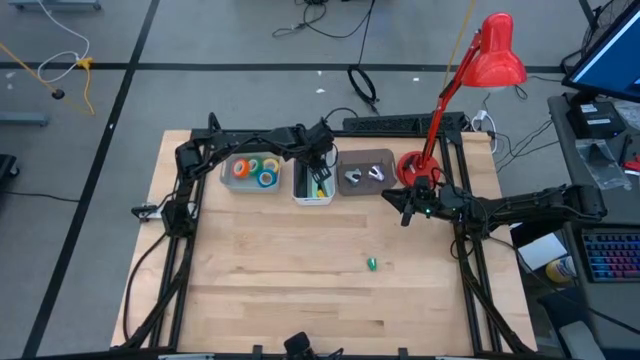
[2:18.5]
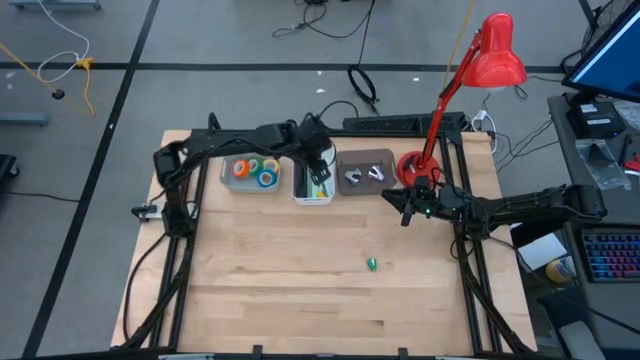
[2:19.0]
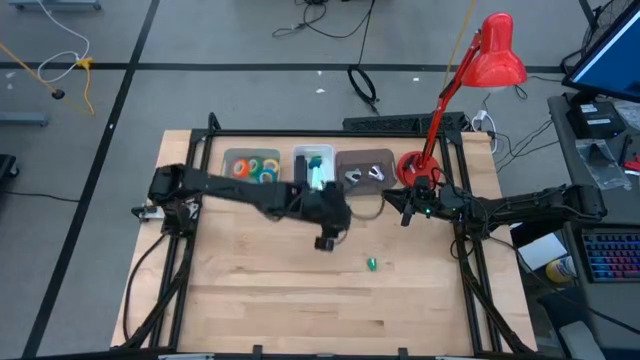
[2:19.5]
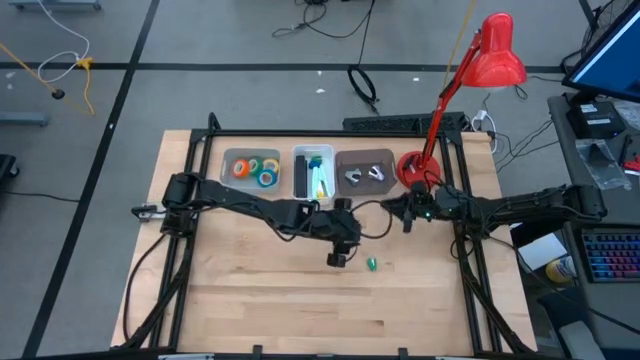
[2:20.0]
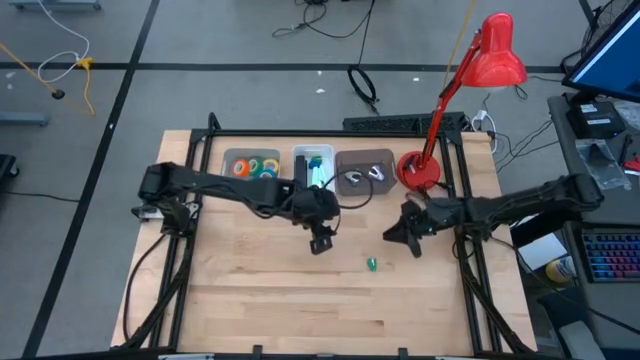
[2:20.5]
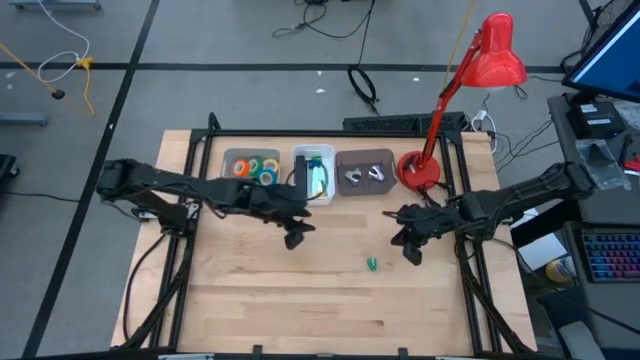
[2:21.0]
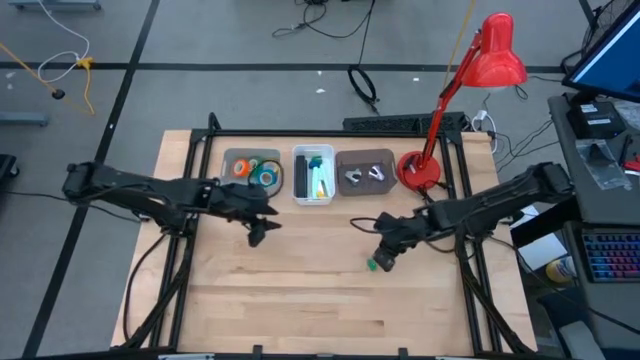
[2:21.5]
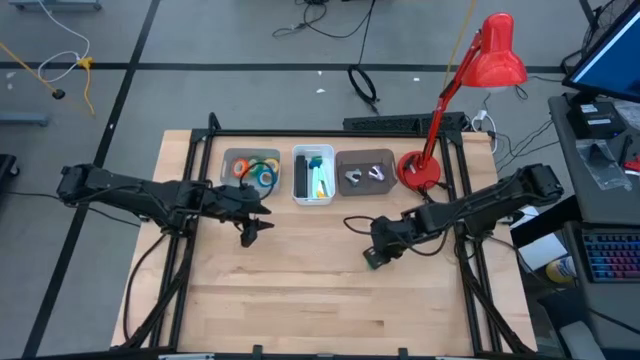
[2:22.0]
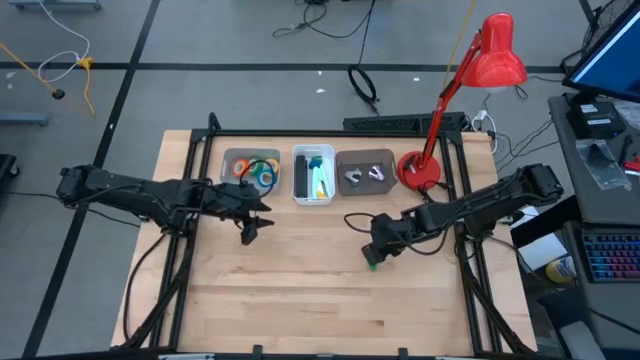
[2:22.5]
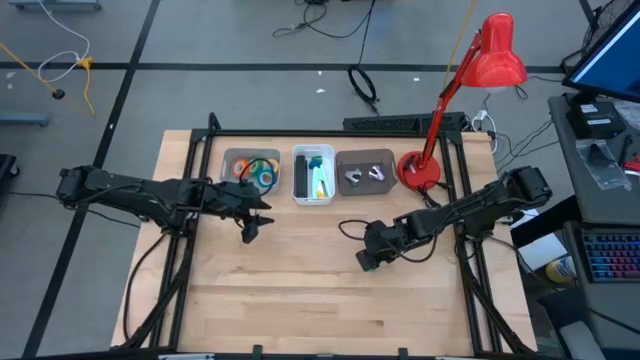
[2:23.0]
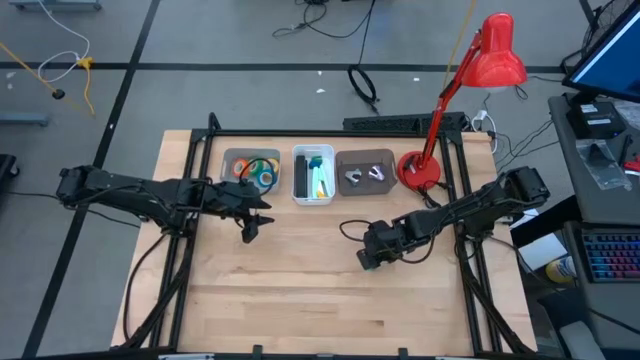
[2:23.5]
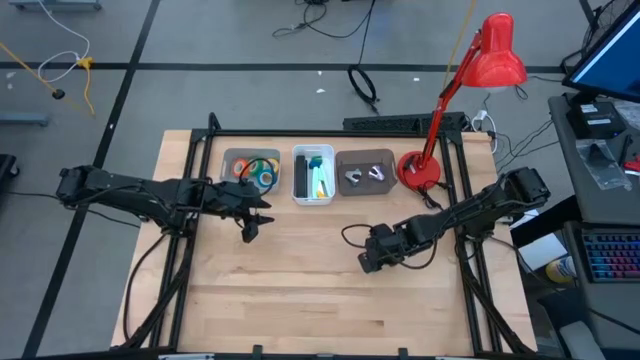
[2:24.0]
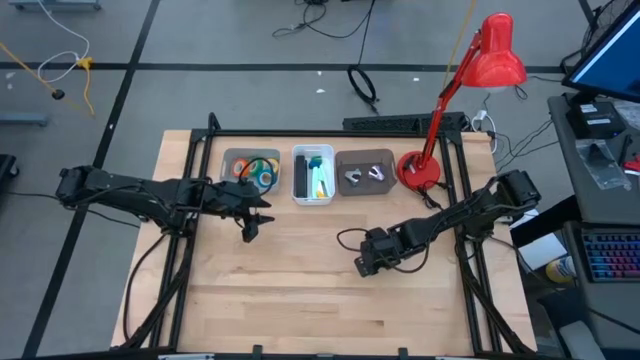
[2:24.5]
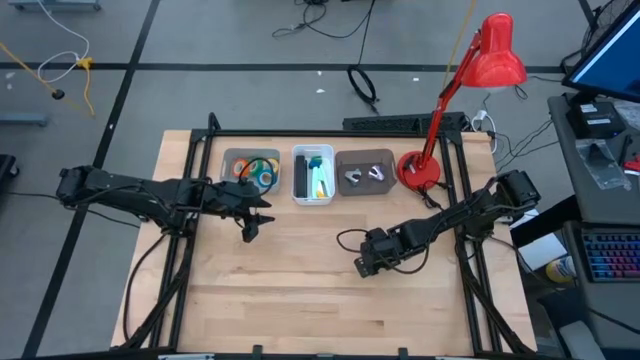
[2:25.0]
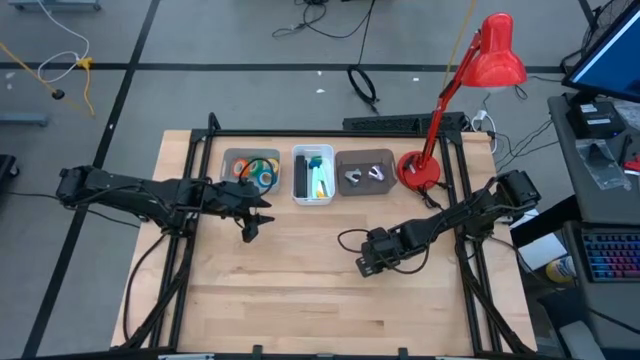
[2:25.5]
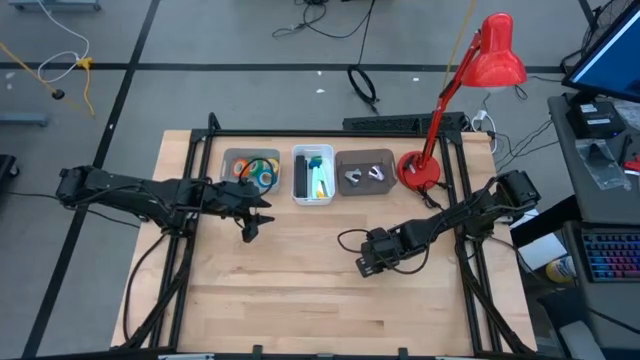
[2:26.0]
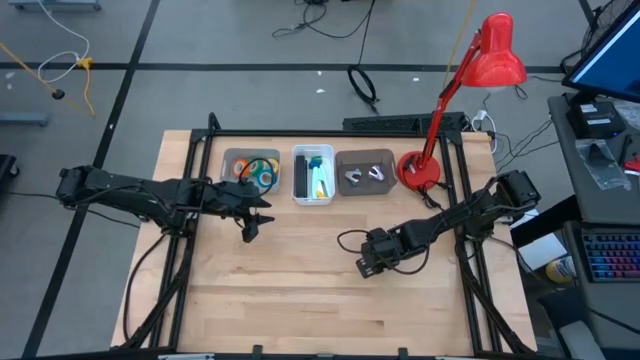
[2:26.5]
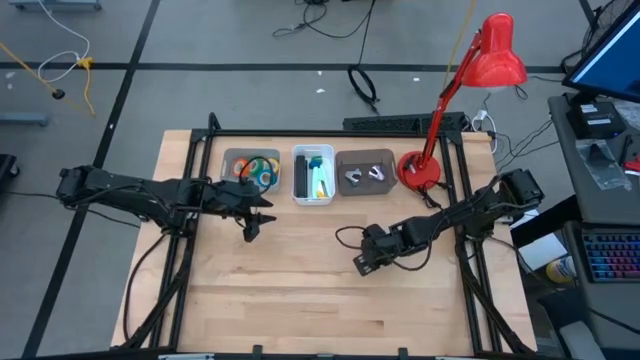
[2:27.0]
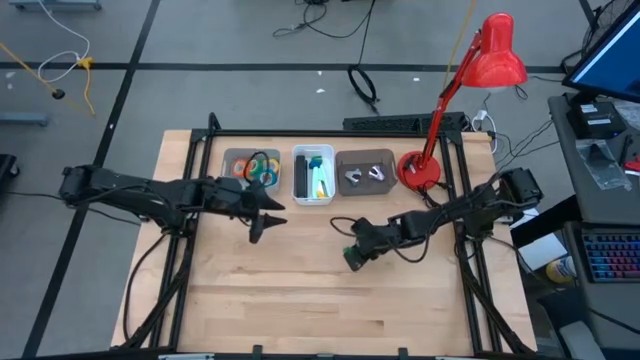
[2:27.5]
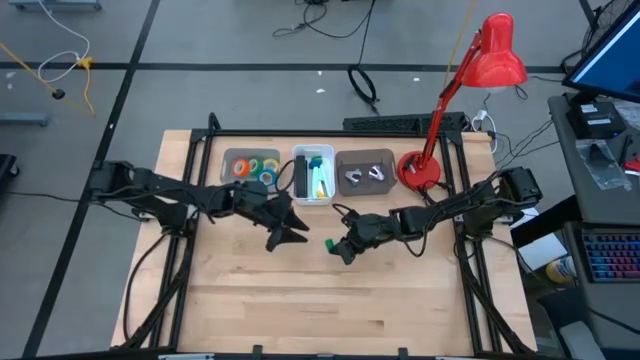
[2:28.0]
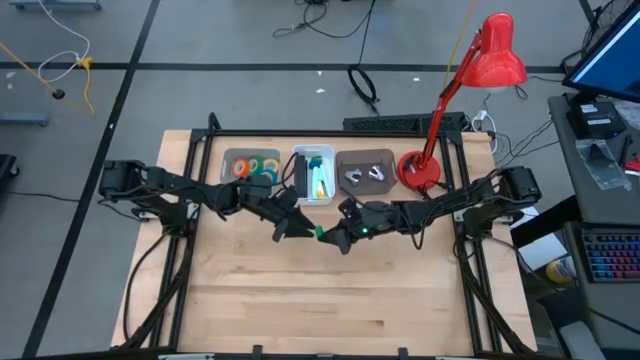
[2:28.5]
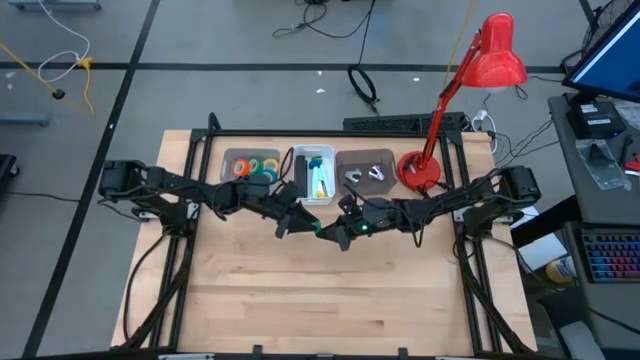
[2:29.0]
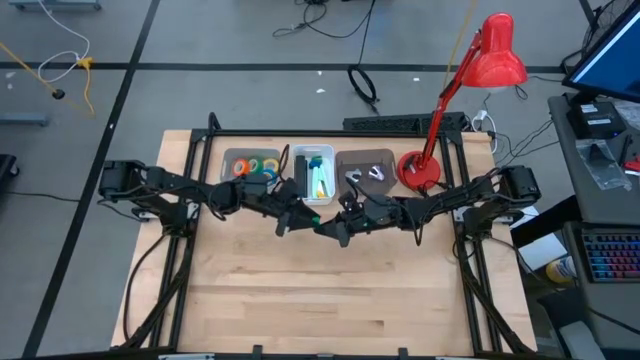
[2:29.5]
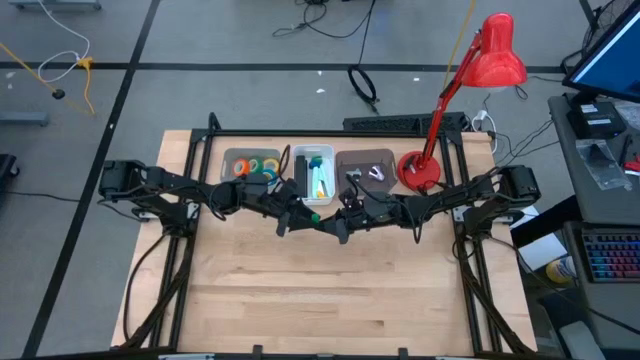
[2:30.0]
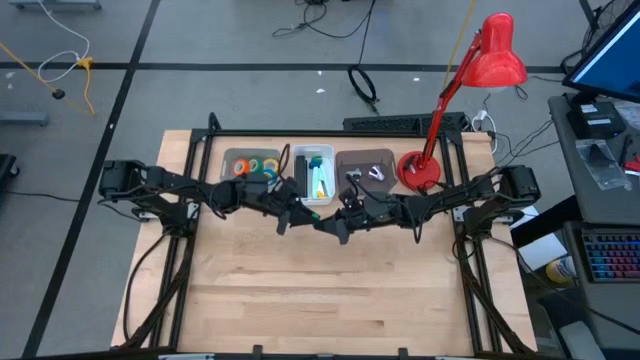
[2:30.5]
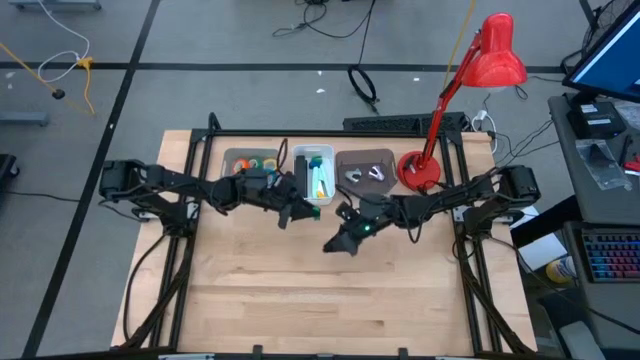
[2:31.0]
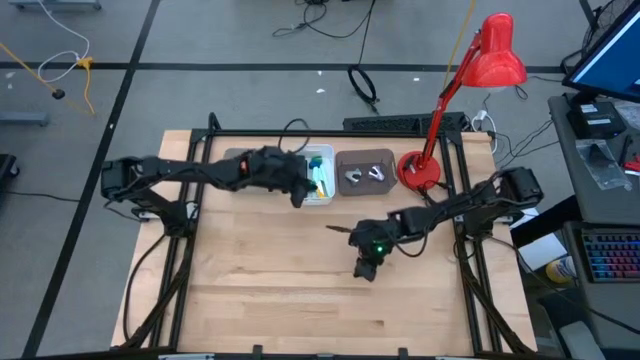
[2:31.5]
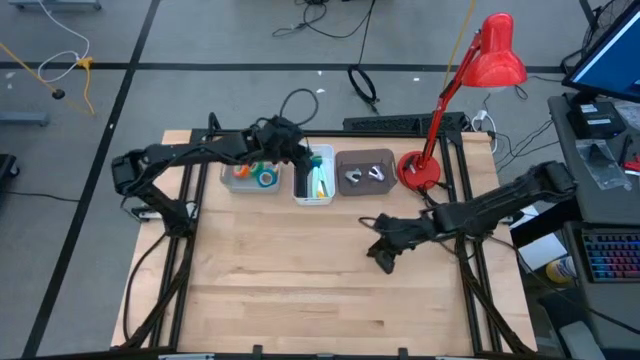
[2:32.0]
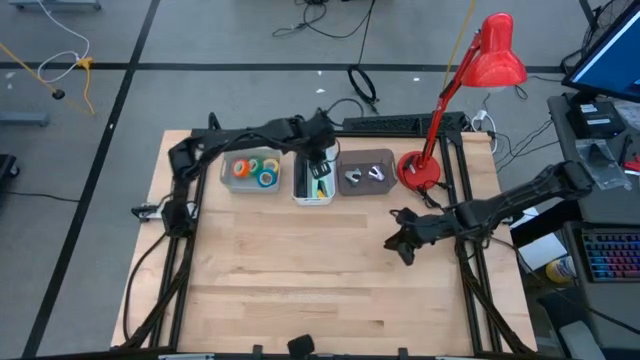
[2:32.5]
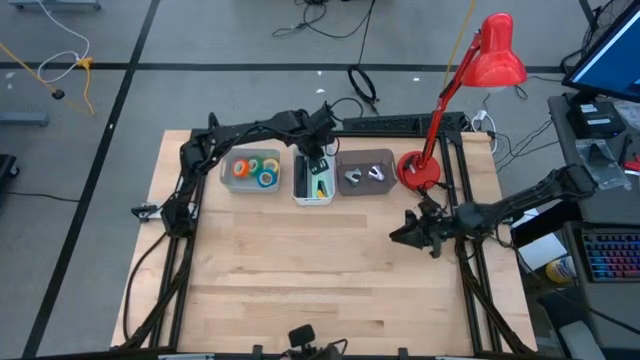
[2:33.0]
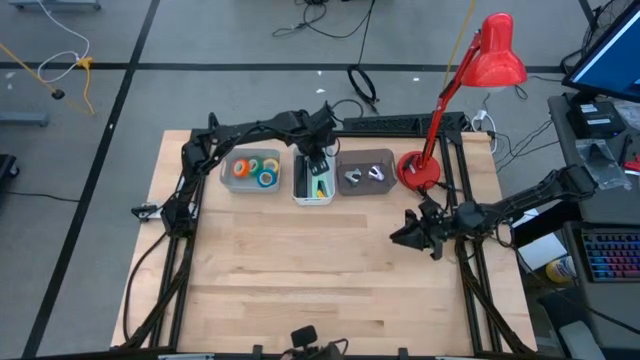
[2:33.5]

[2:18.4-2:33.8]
Task: Pick and place Stapler, Stapler remover, tape
Put the green stapler into the white bin

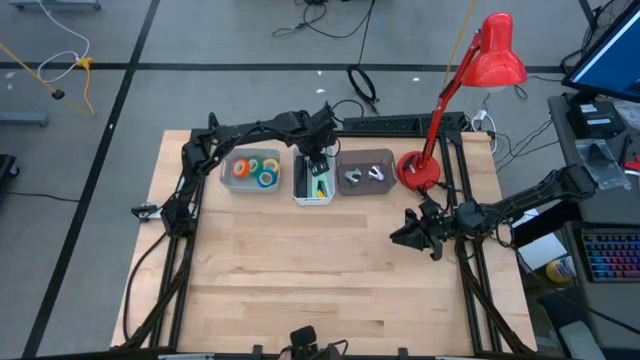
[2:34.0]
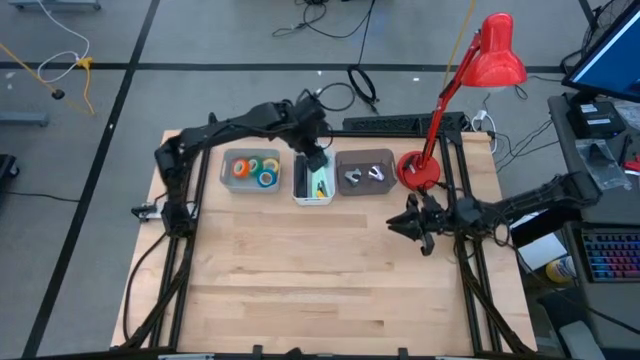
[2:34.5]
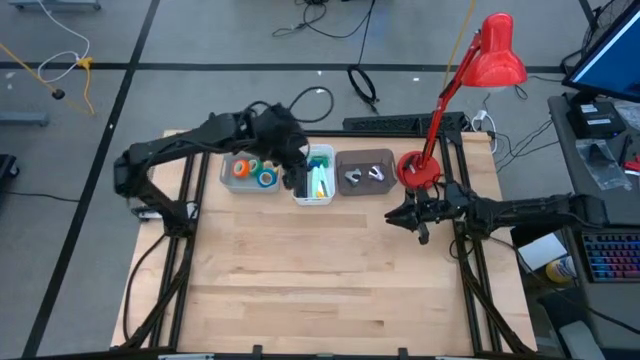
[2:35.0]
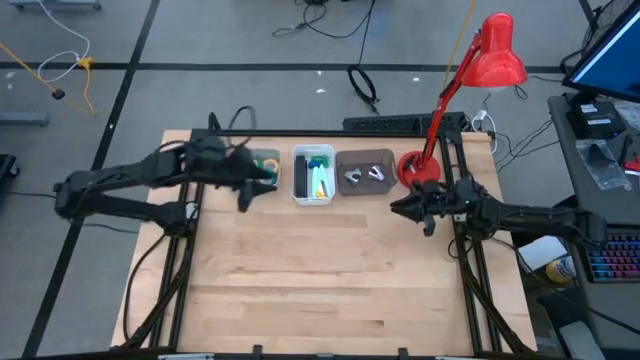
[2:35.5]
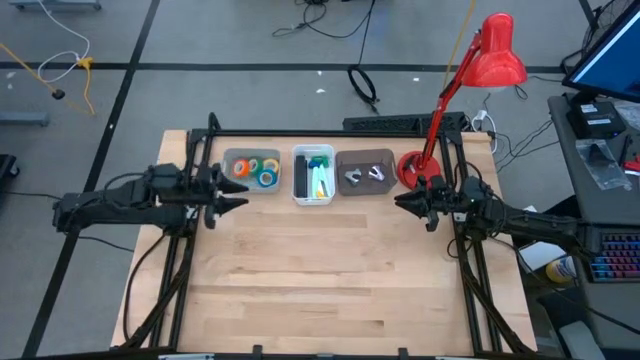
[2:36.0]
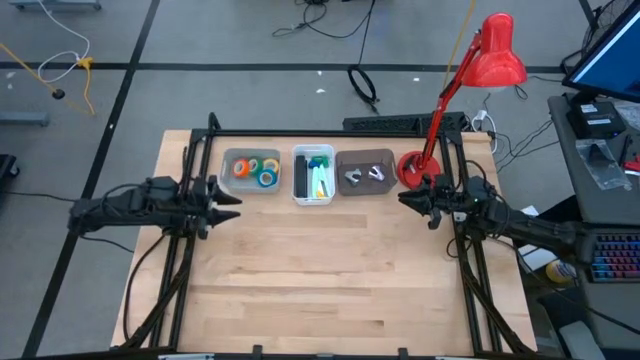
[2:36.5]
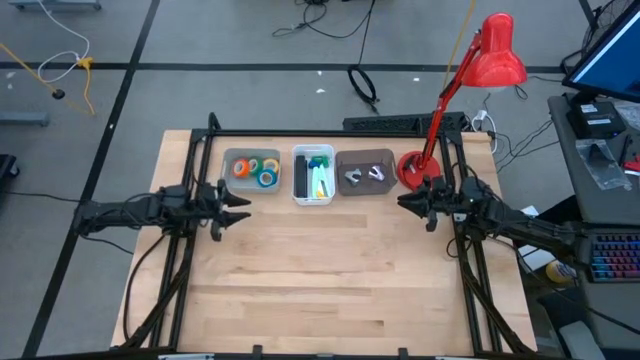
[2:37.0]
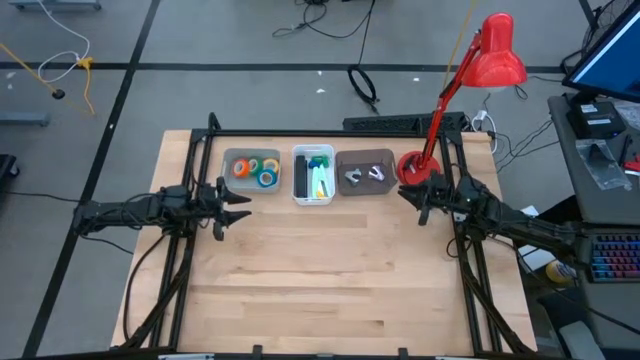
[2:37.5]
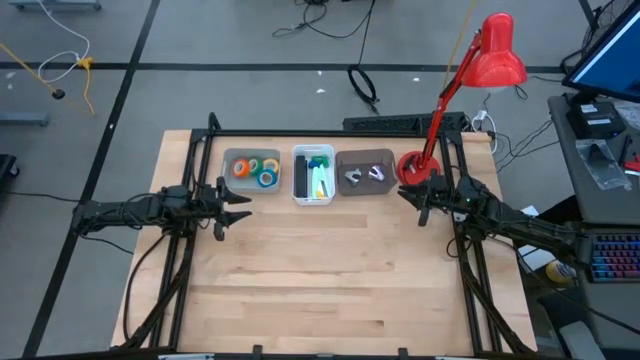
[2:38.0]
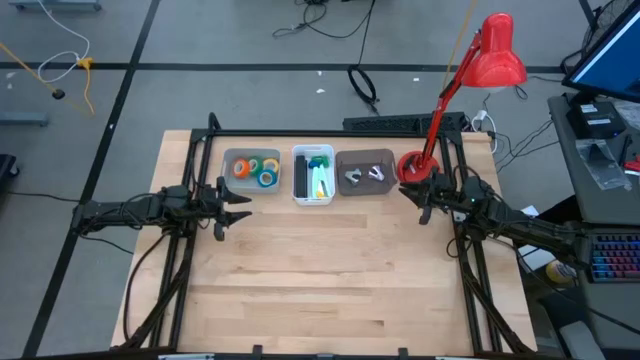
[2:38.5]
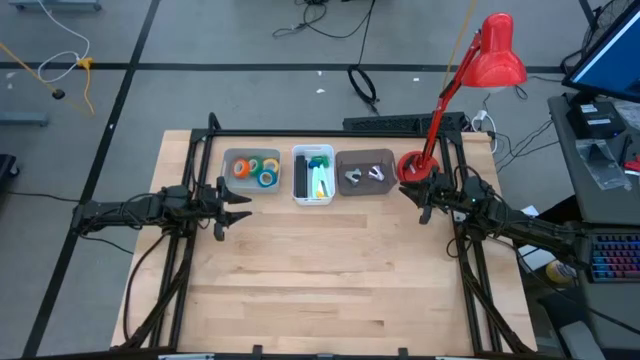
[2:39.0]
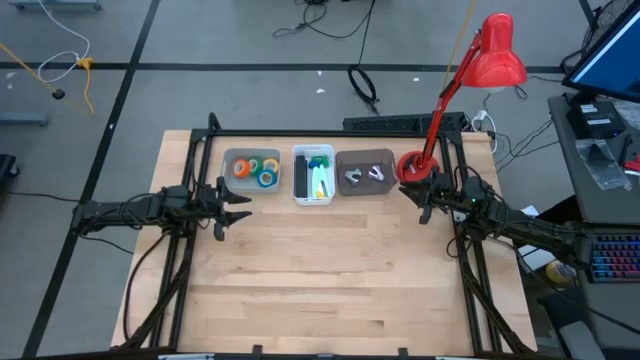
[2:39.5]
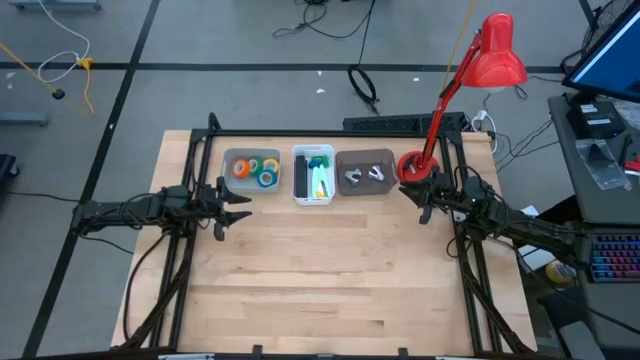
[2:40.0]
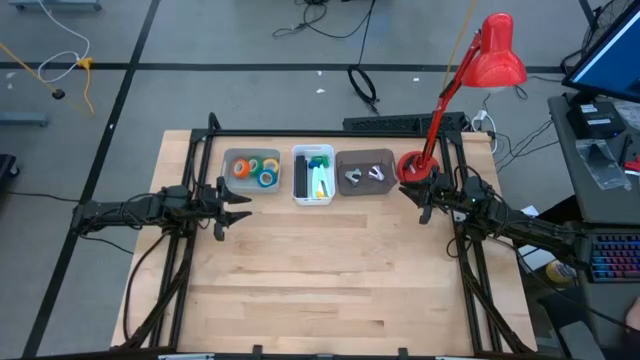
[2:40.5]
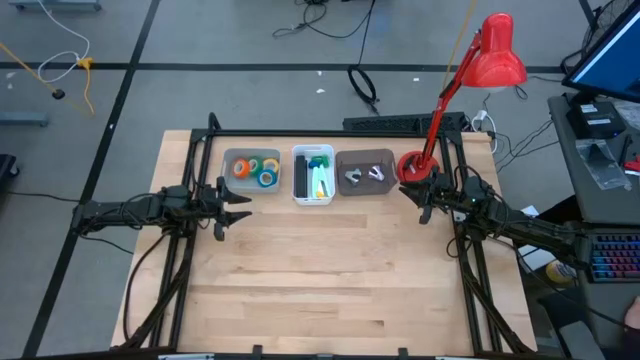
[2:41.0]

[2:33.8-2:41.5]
Return to Home Position
